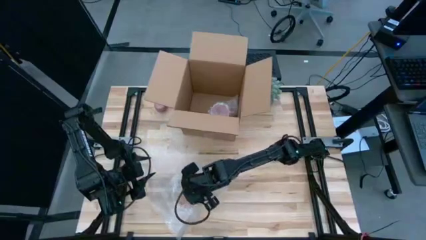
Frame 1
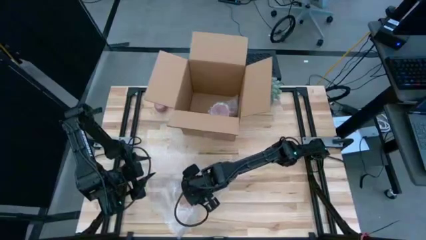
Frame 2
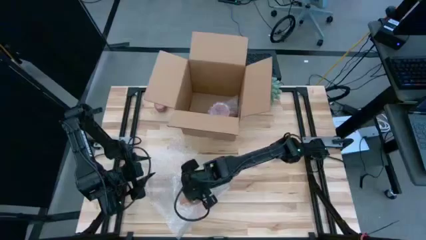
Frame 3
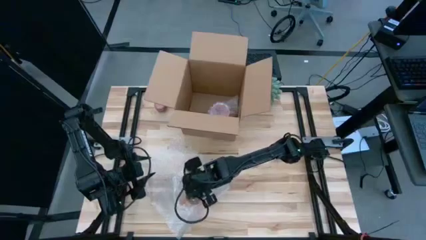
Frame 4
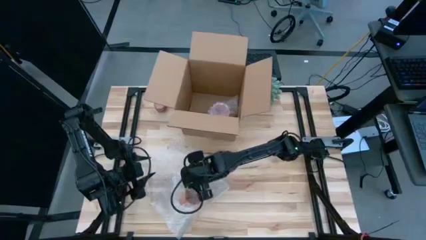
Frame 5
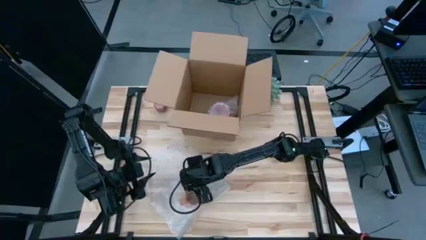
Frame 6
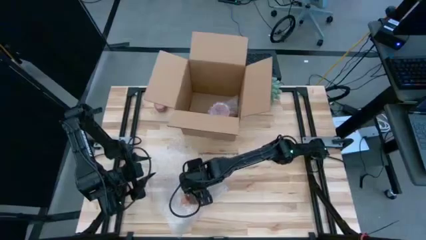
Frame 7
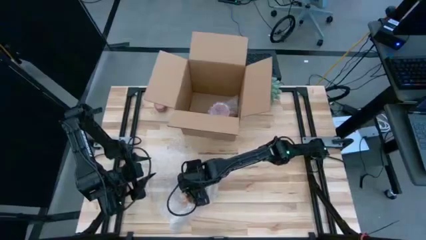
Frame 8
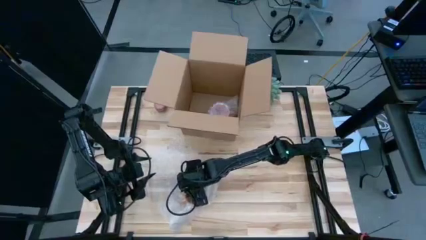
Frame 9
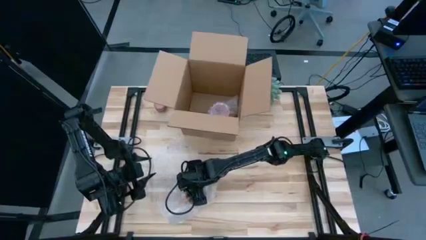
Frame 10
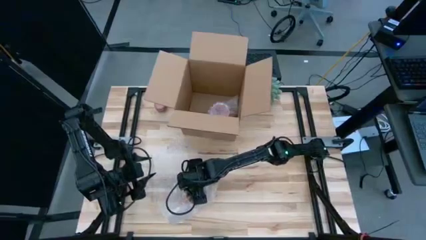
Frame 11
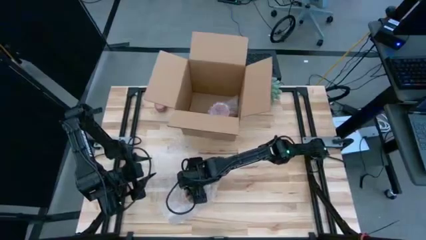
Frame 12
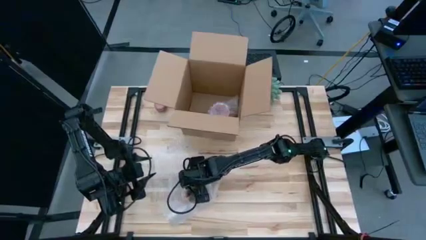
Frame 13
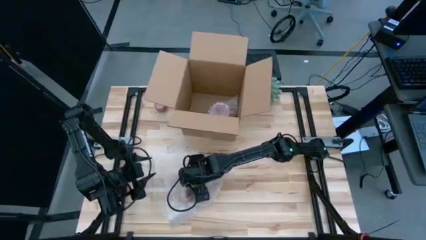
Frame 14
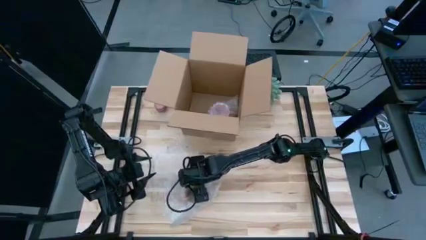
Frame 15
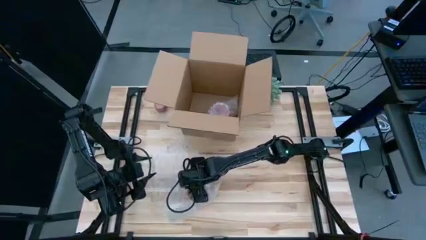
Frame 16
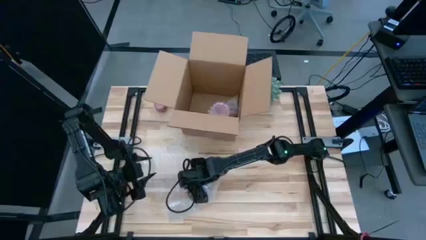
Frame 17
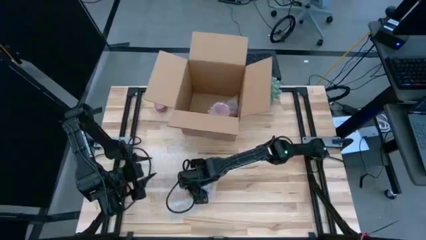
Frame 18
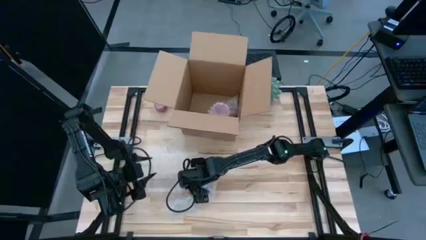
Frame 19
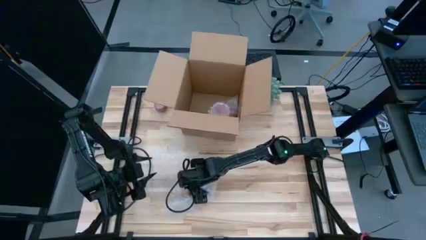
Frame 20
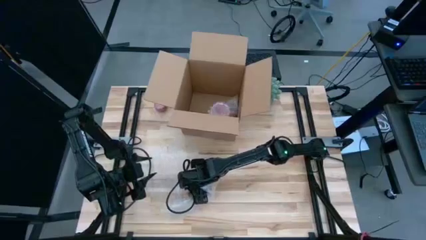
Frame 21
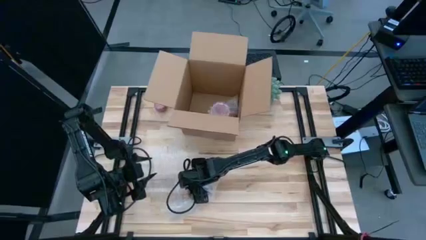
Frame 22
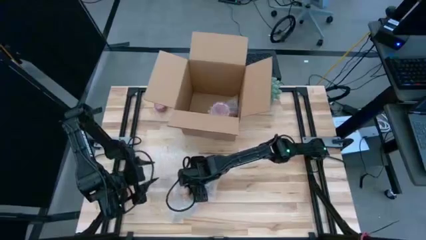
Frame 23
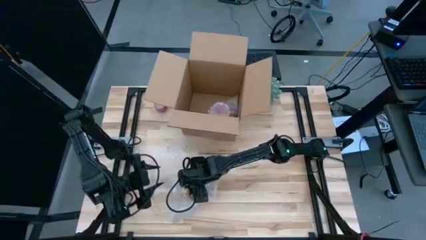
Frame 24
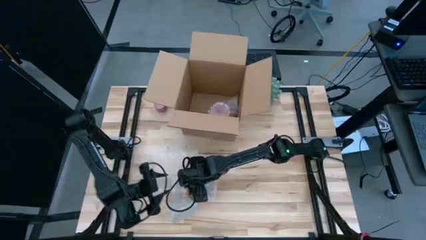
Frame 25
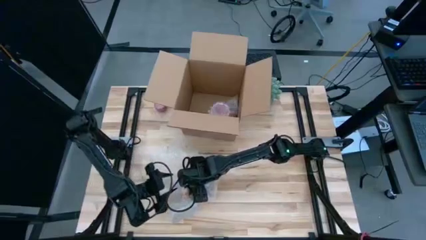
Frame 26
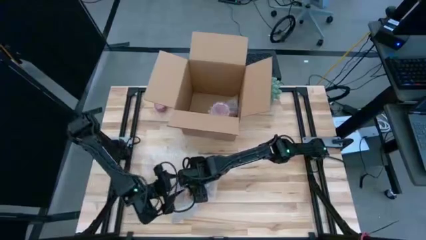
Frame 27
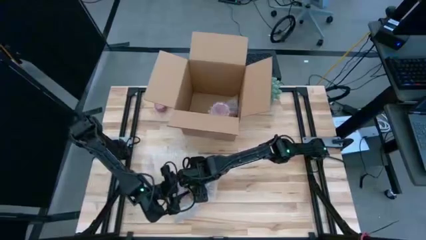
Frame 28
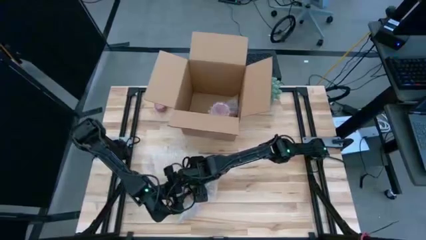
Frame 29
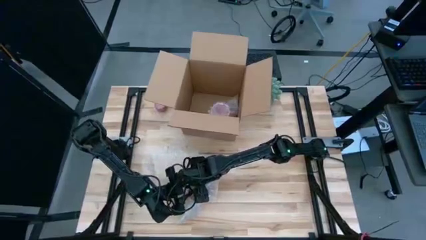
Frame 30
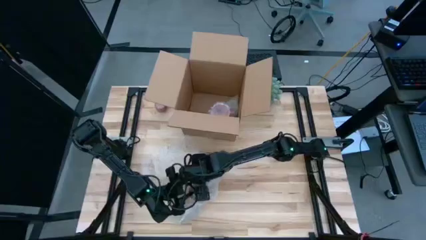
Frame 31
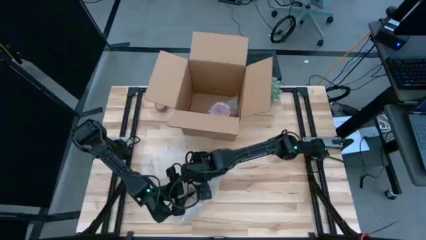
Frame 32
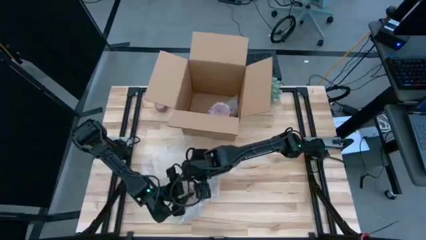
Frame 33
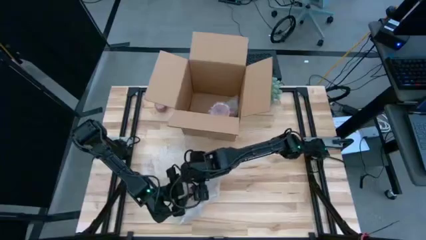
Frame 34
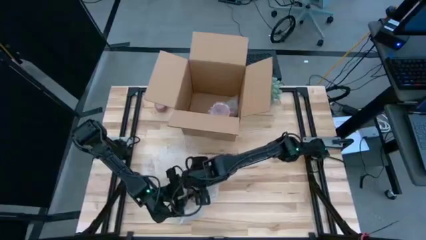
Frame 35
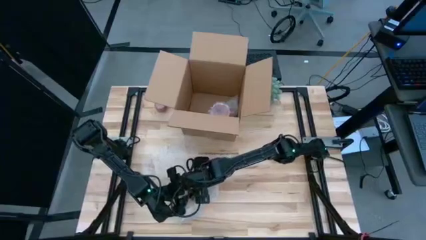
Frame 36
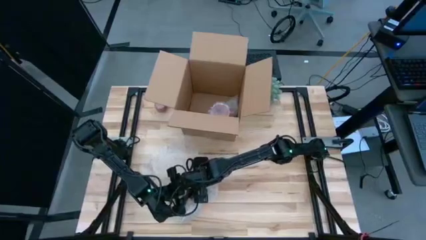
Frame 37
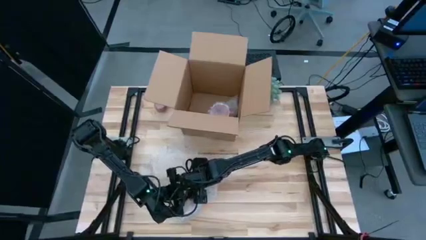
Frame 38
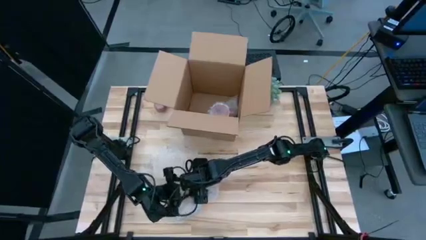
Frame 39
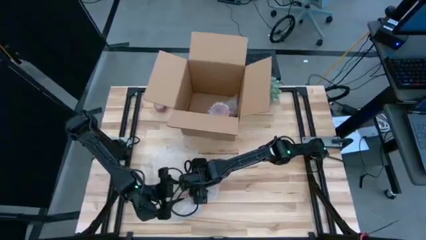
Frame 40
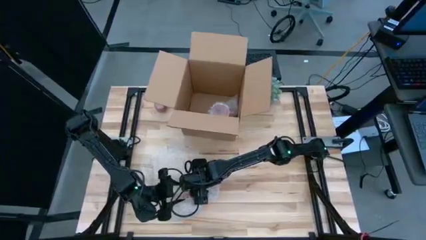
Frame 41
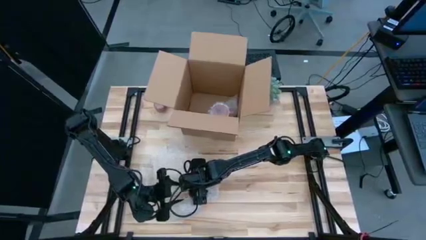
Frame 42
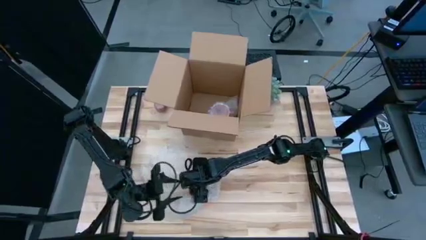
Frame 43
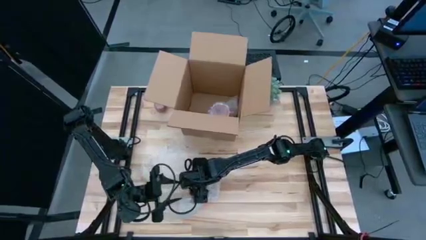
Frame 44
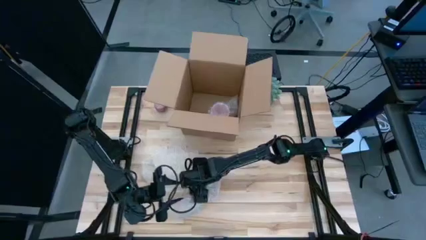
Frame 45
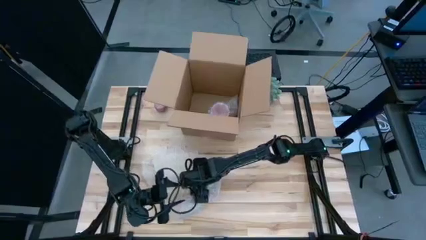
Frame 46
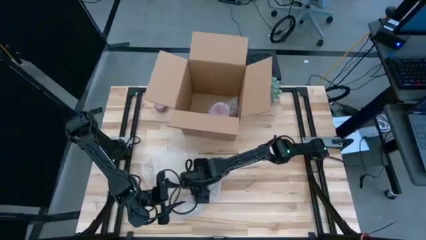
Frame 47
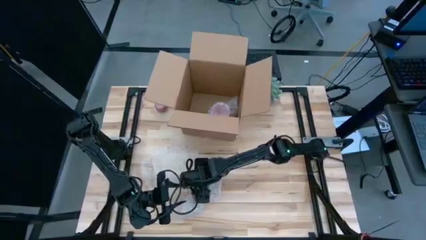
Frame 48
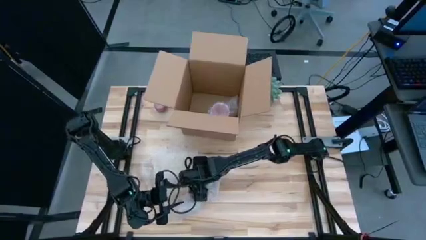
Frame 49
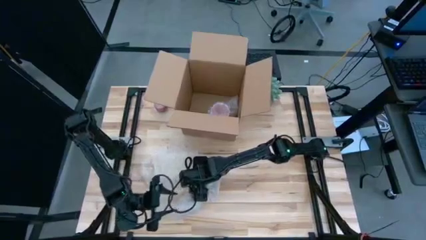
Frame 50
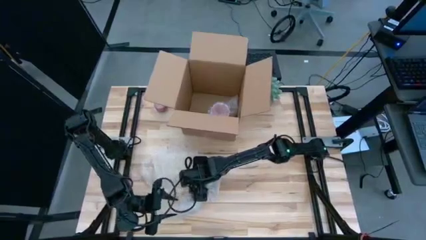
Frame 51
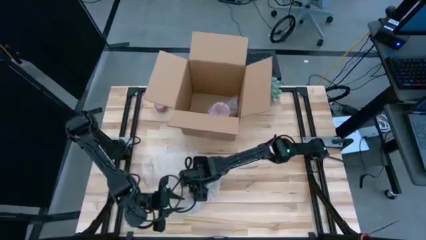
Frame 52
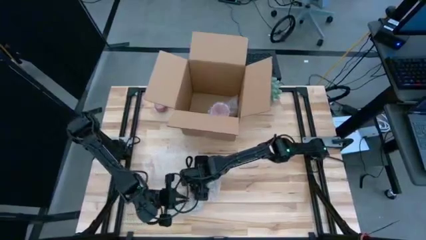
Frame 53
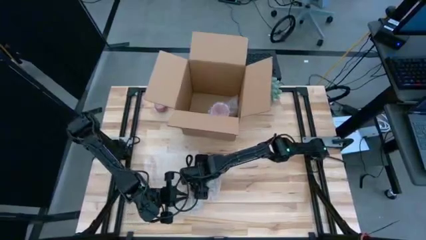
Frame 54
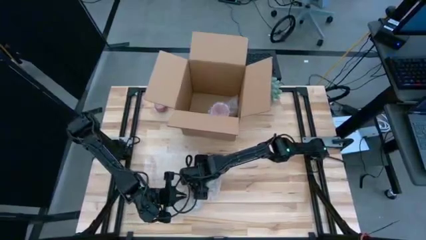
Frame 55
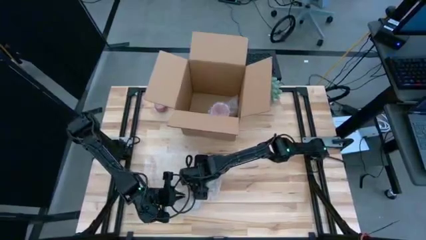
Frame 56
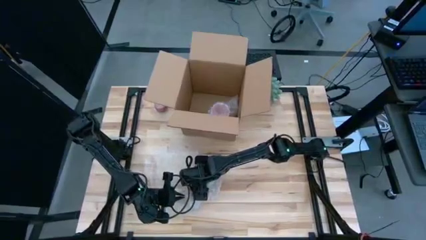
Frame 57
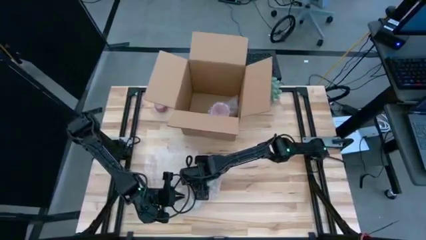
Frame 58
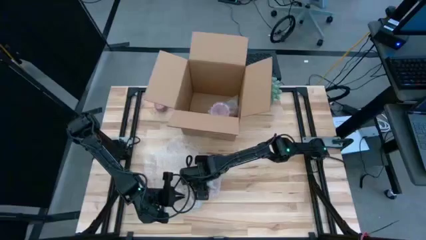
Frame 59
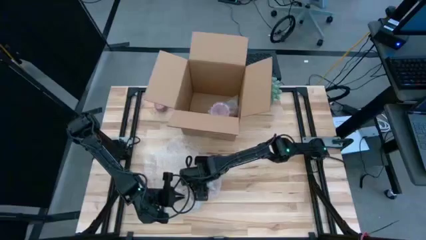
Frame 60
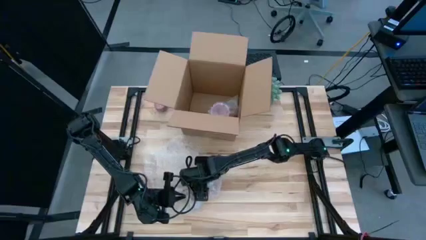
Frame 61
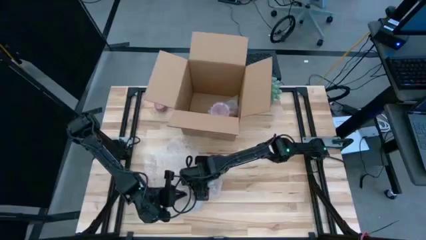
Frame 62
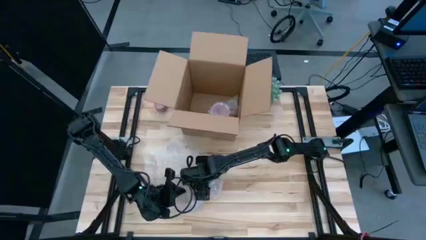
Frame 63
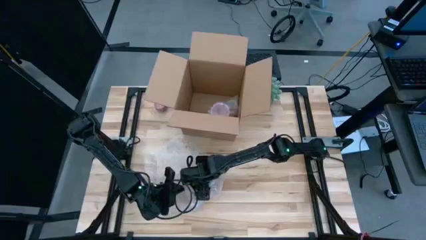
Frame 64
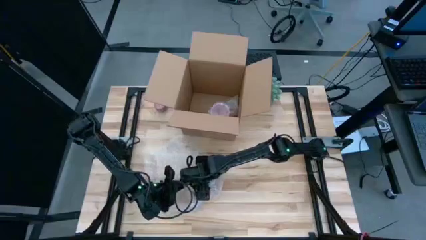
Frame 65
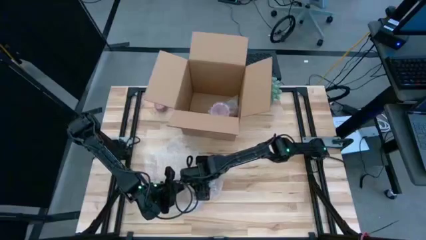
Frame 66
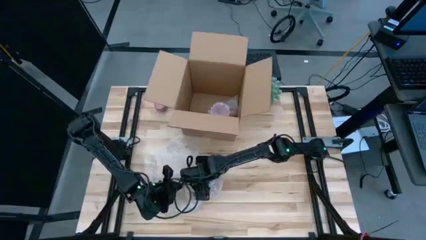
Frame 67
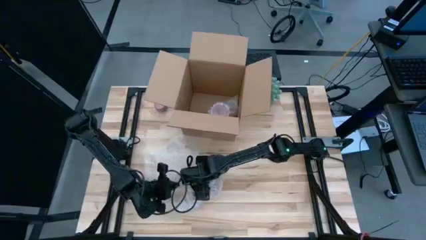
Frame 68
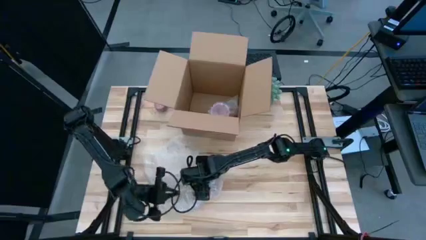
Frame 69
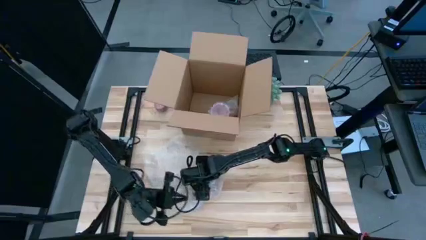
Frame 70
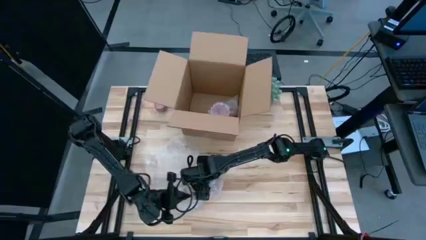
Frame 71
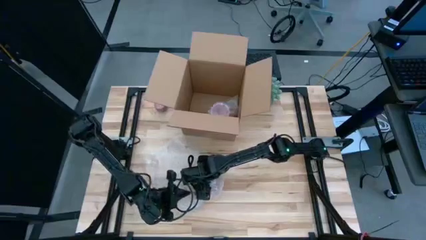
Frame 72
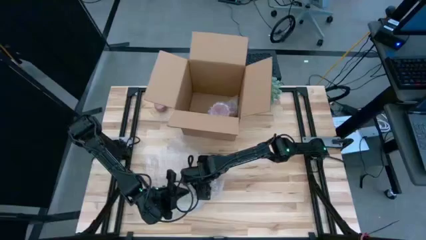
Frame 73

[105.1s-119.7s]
Task: wrap mug
Wrap the orange cup with bubble wrap

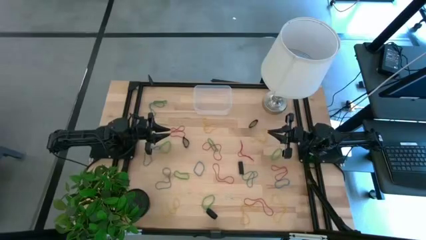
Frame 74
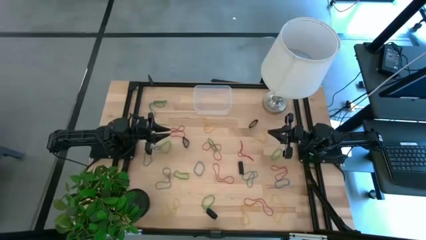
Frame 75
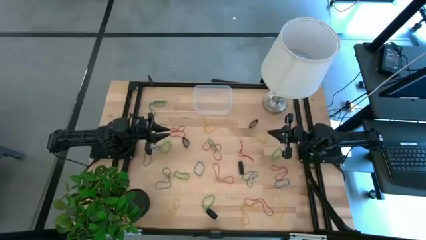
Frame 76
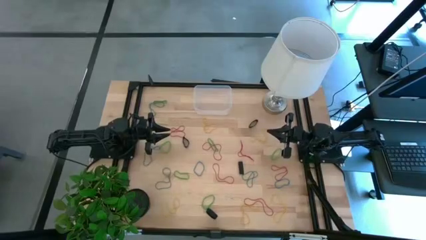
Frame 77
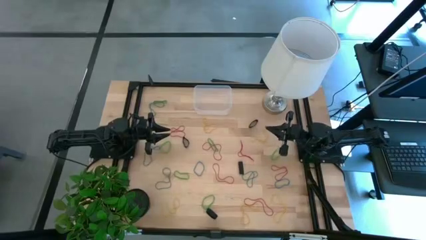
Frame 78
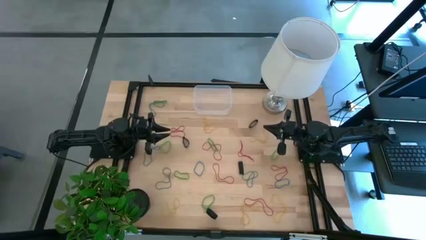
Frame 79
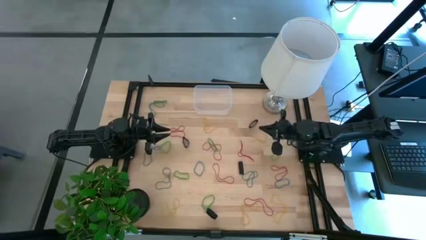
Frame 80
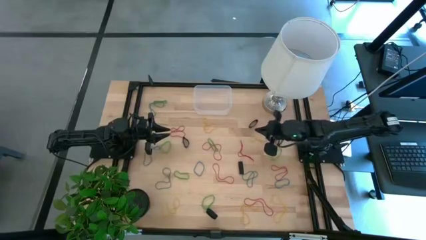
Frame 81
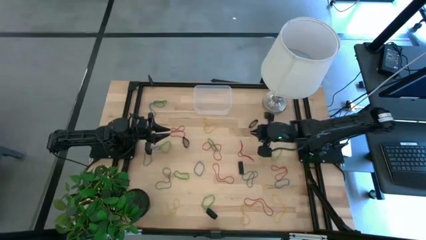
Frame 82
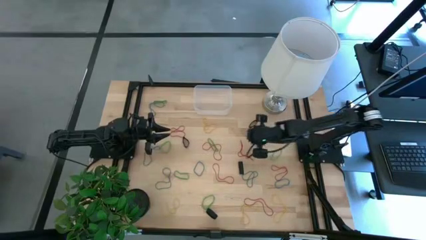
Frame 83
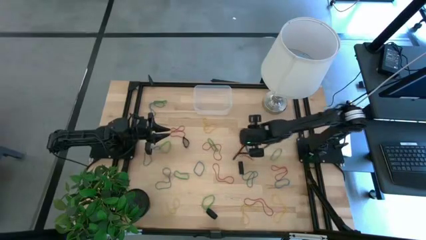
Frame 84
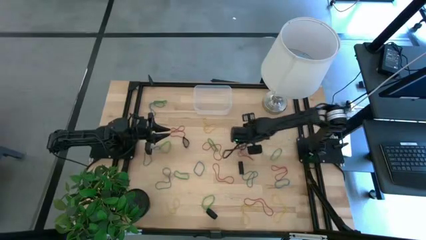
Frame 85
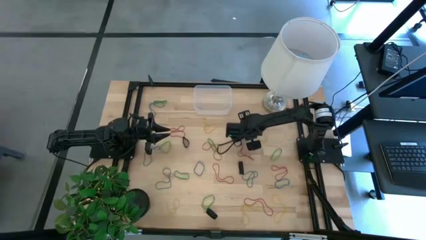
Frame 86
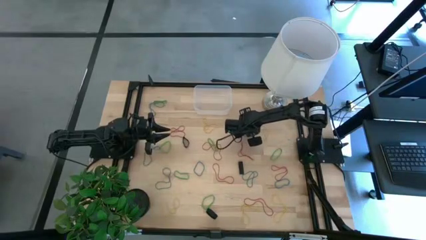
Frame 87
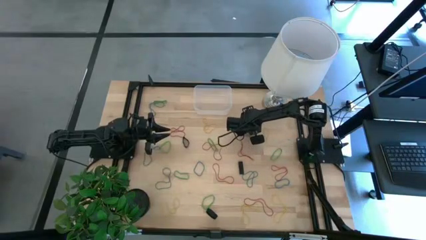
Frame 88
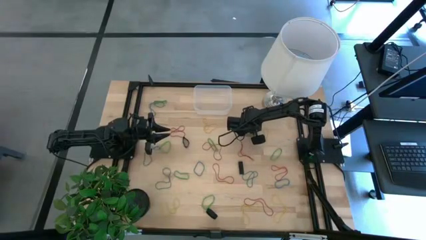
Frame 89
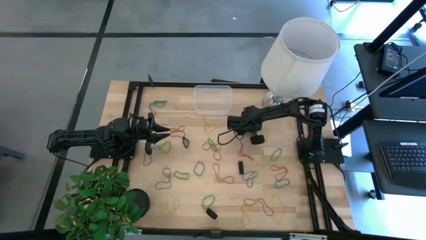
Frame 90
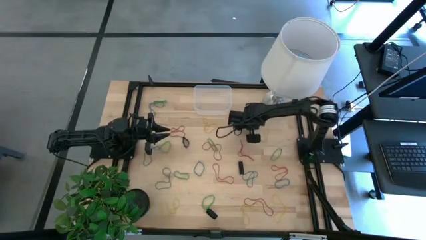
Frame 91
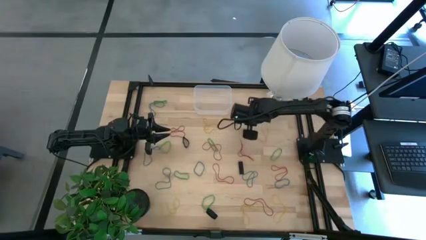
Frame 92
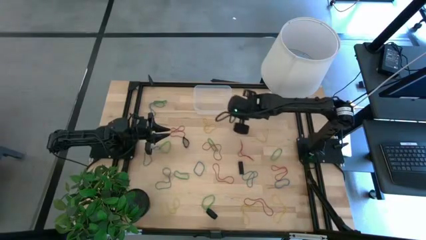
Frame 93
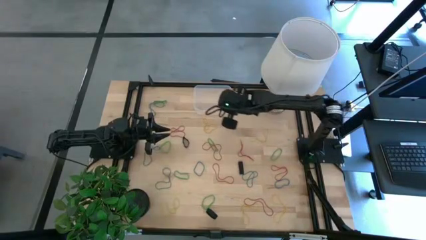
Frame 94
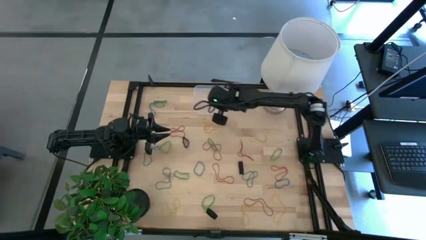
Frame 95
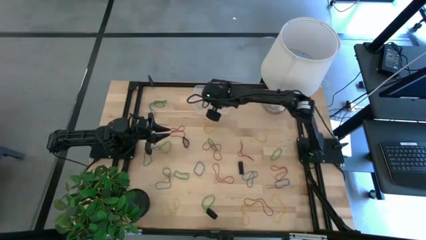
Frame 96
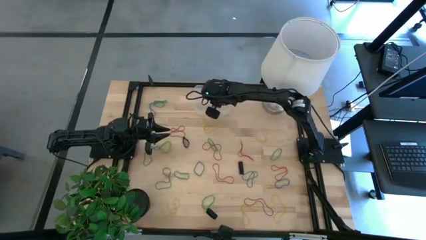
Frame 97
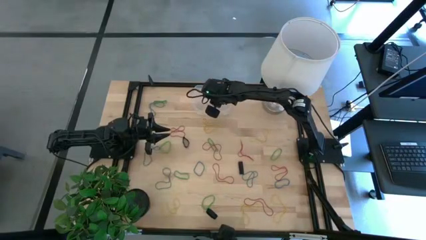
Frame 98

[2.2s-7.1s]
Task: Pick and place rubber bands into bin
Put the black rubber band into the transparent bin
